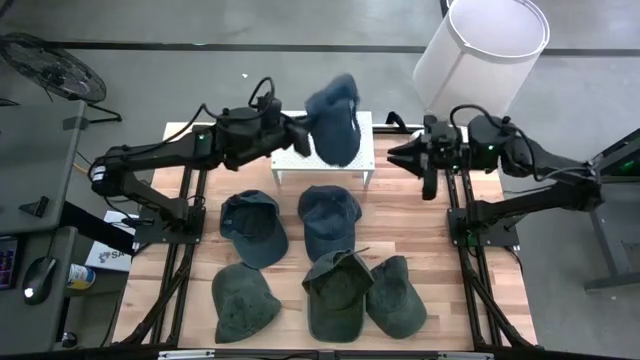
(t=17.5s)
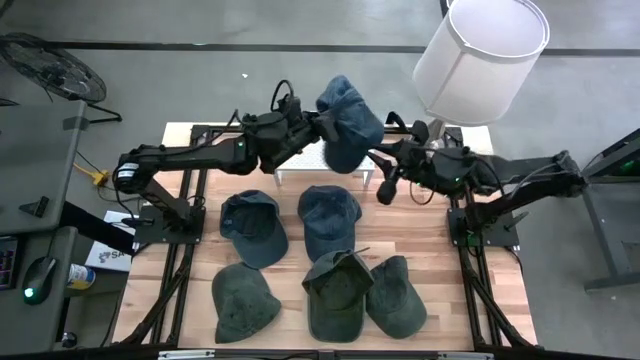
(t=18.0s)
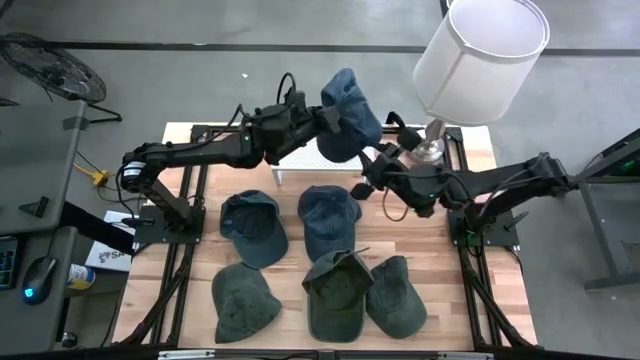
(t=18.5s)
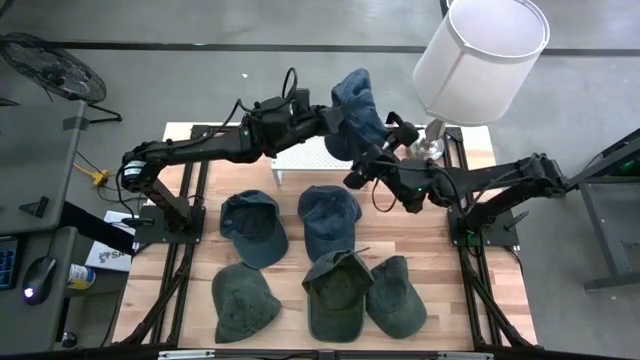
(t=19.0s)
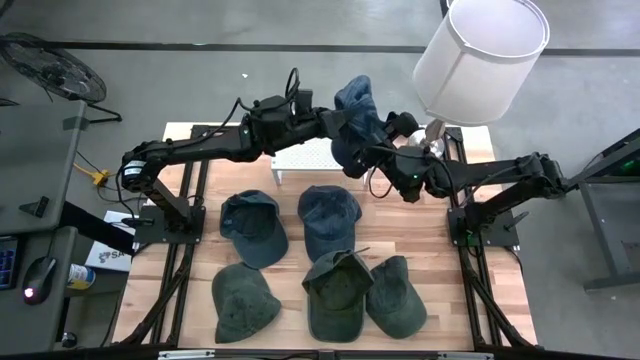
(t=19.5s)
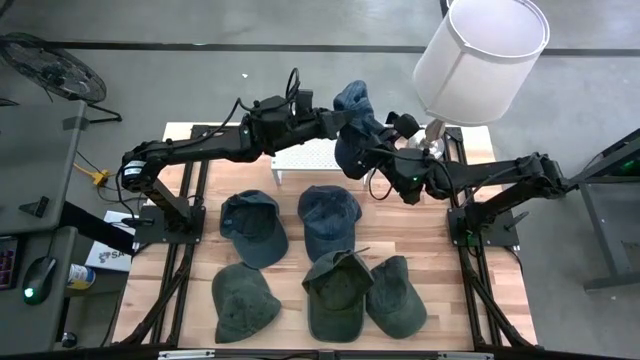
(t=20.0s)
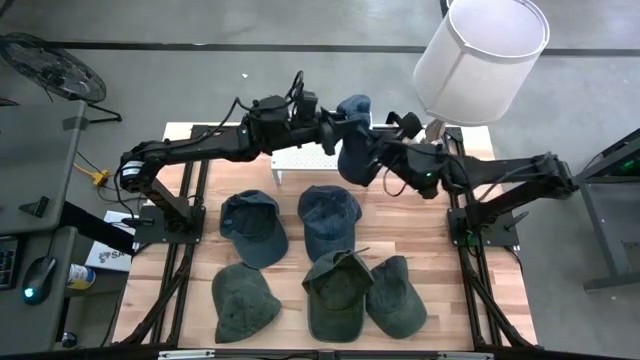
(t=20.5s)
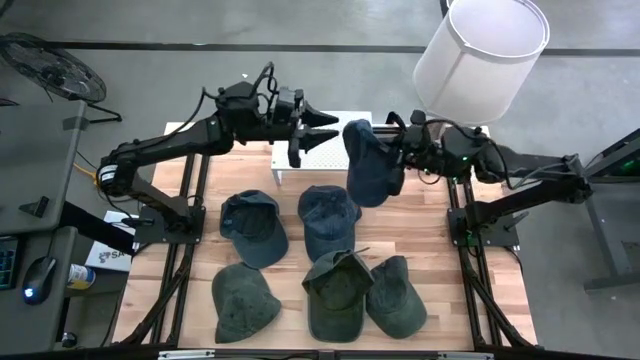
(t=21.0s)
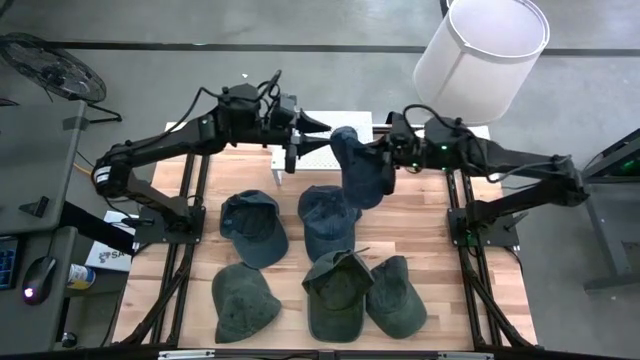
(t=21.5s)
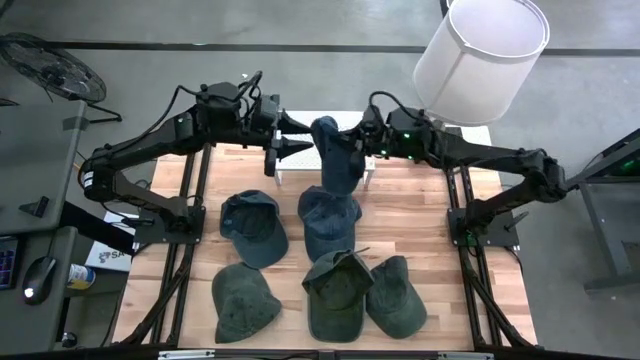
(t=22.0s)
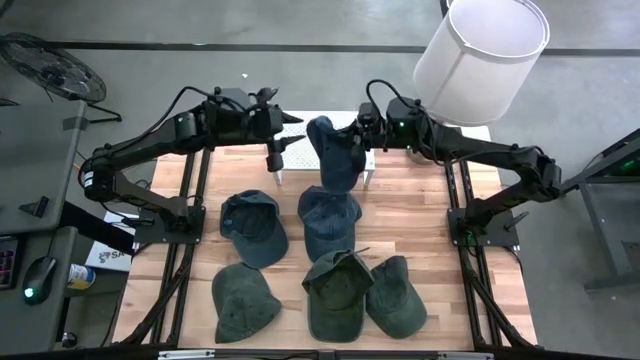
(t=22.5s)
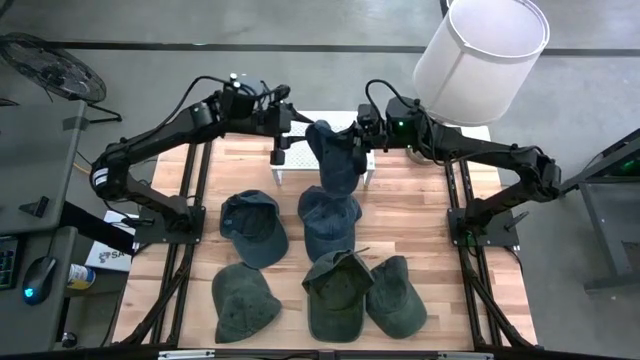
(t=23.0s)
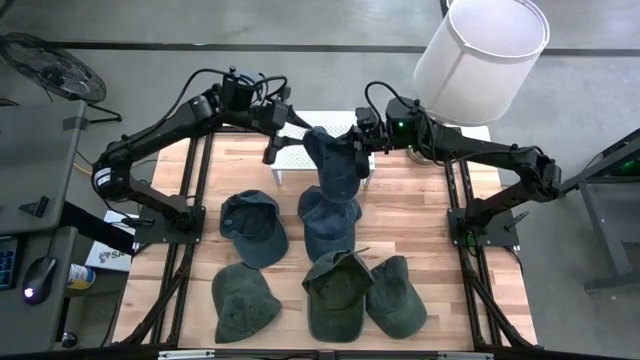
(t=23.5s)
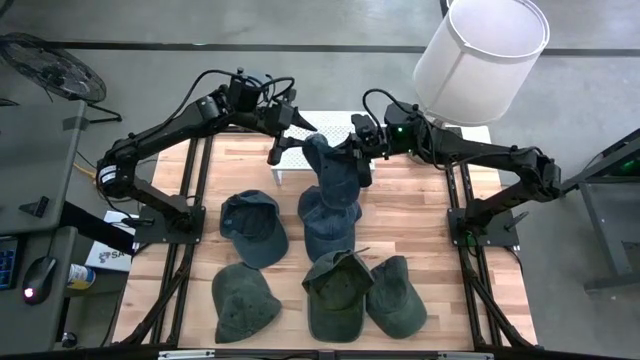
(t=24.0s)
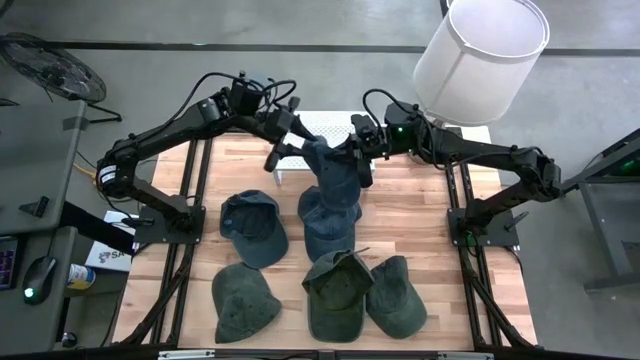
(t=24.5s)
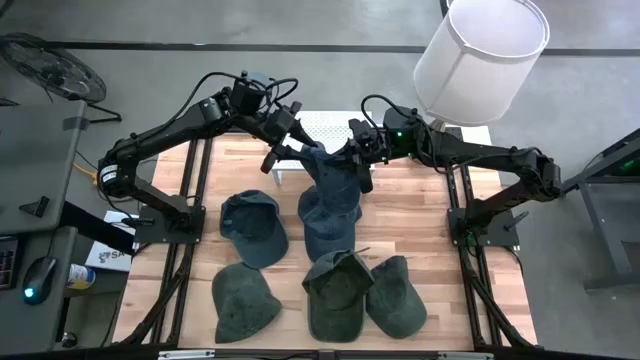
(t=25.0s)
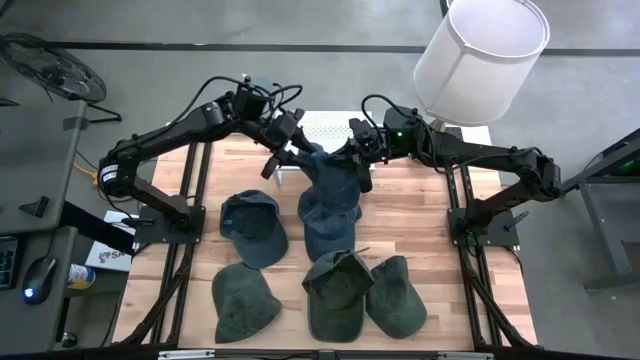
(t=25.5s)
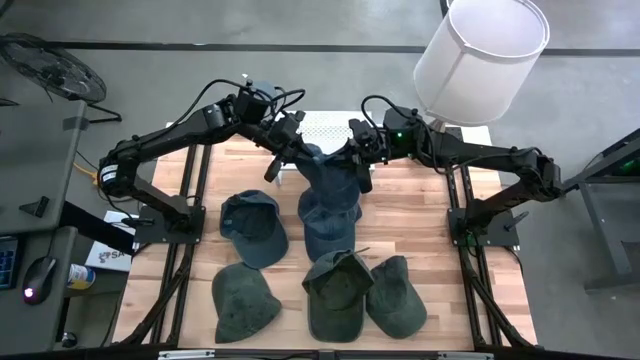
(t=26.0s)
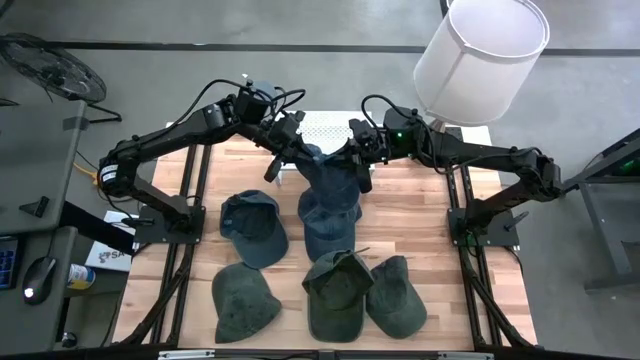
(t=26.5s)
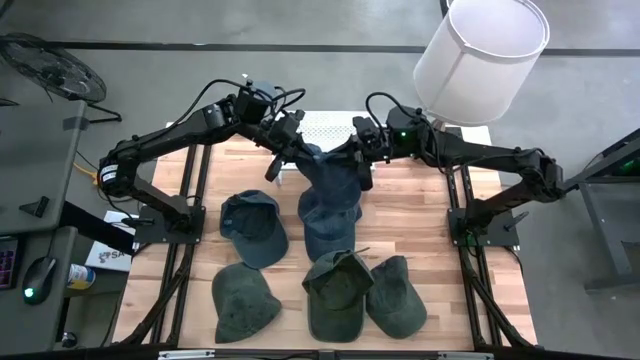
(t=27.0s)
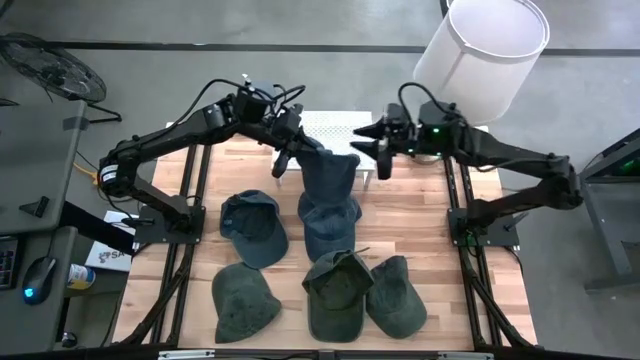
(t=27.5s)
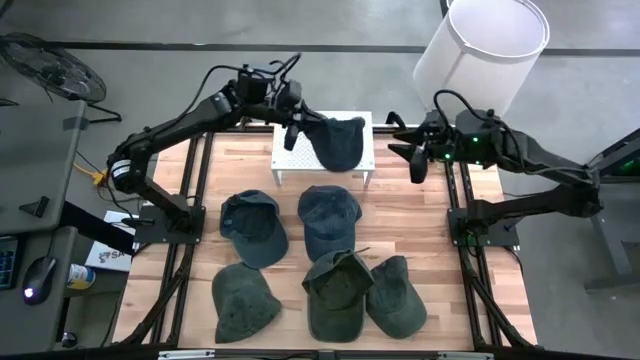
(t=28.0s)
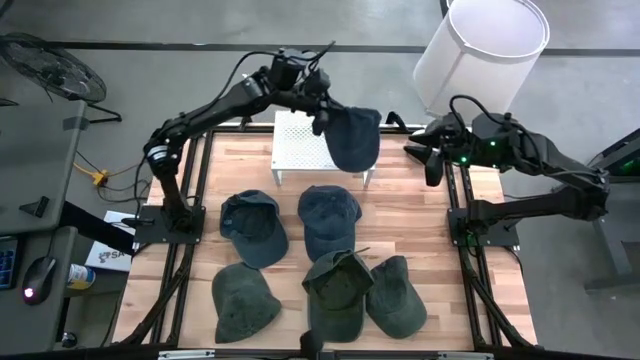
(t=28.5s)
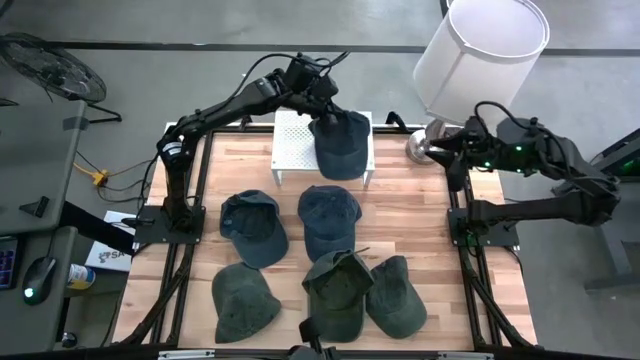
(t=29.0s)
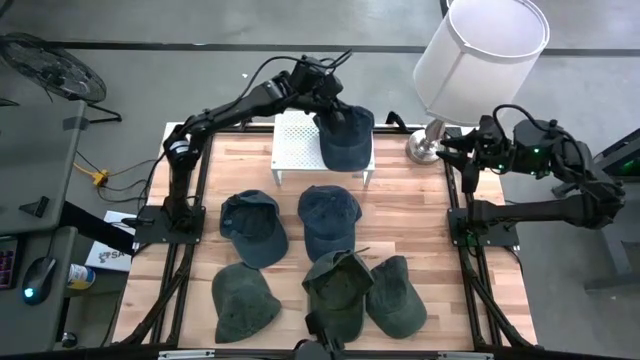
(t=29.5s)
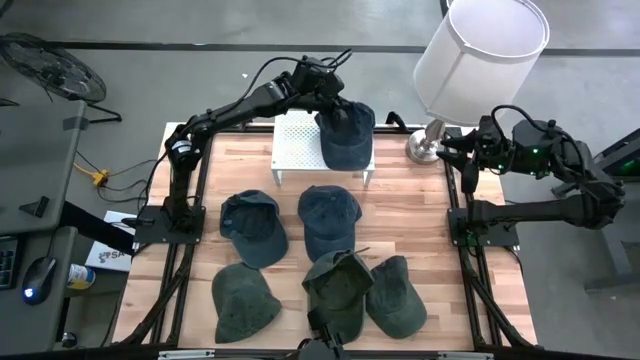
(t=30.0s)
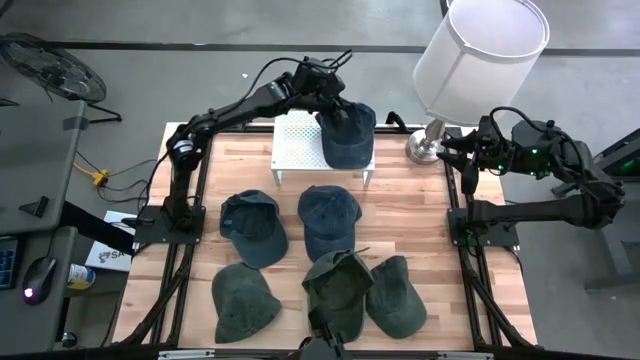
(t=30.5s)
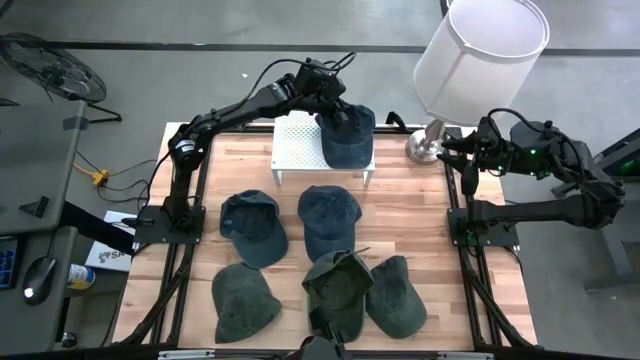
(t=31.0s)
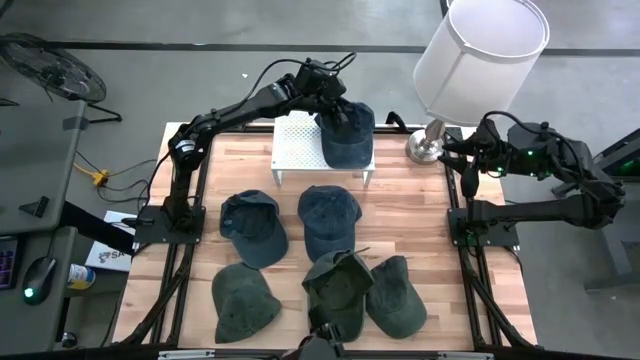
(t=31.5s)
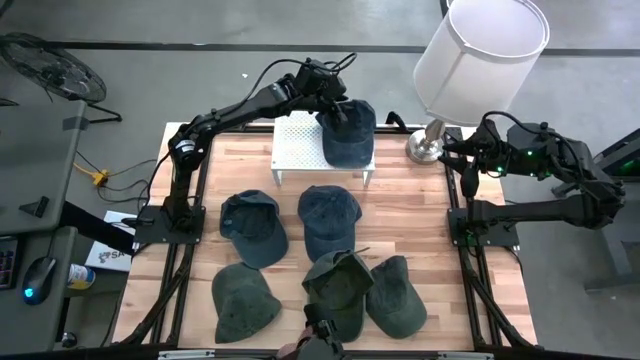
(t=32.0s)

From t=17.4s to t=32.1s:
Task: Pick & Place hat
Put the right blue cap on the shelf

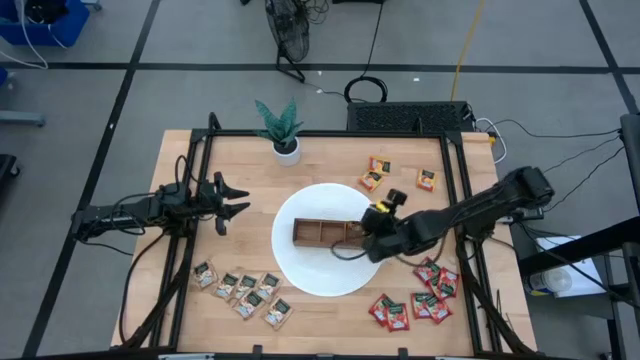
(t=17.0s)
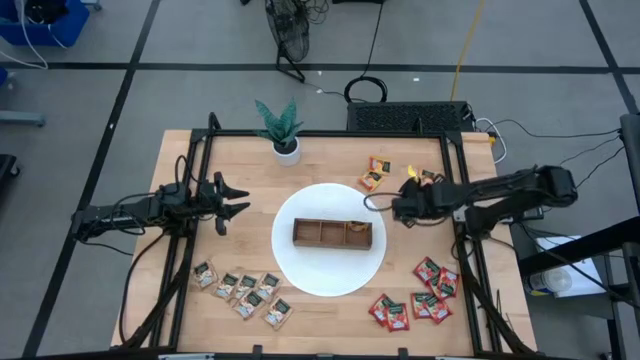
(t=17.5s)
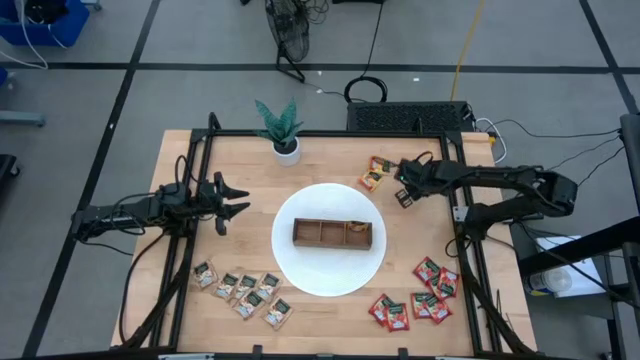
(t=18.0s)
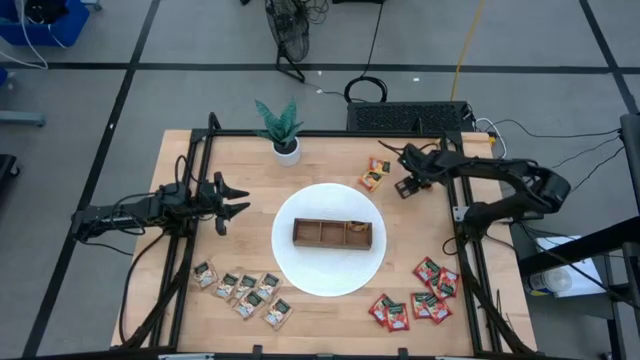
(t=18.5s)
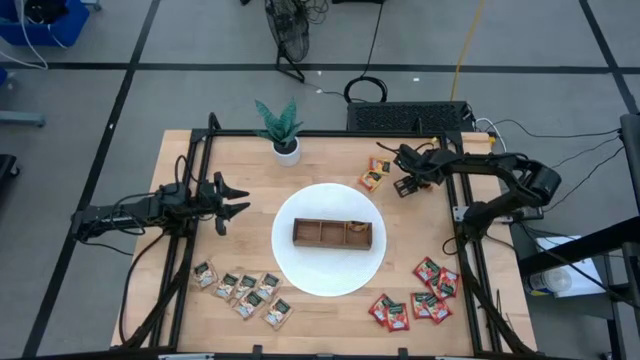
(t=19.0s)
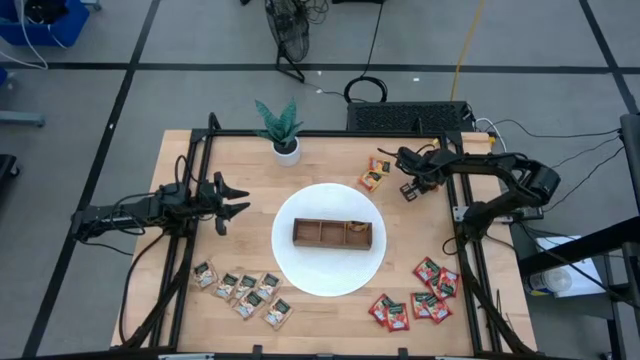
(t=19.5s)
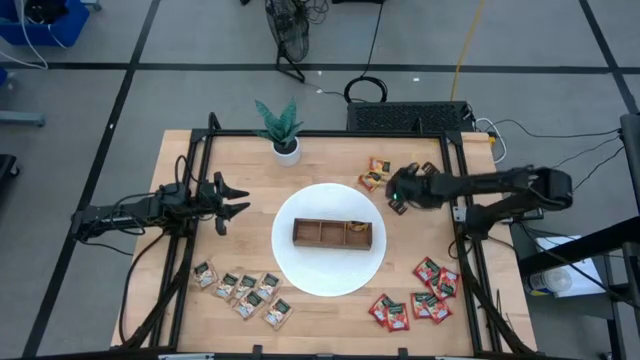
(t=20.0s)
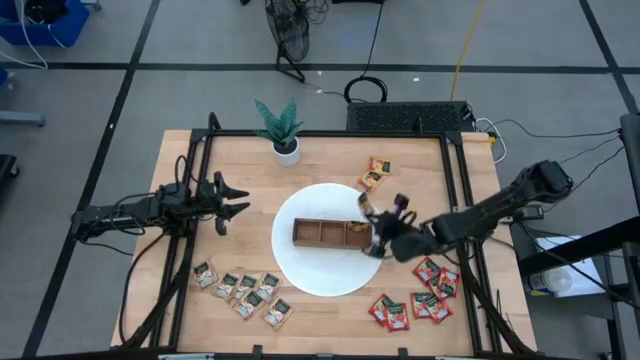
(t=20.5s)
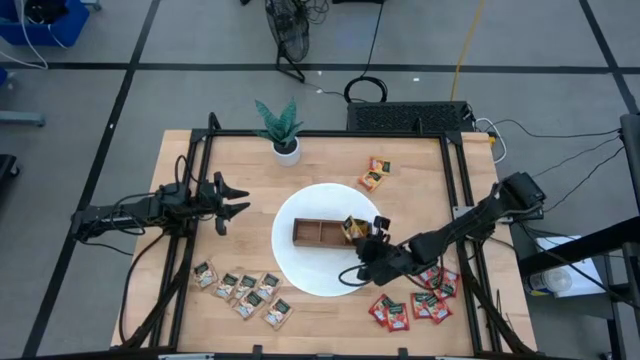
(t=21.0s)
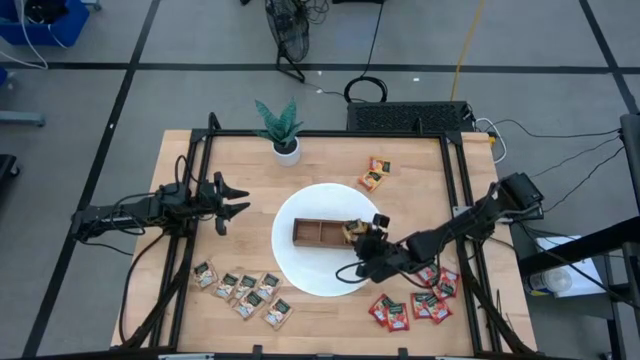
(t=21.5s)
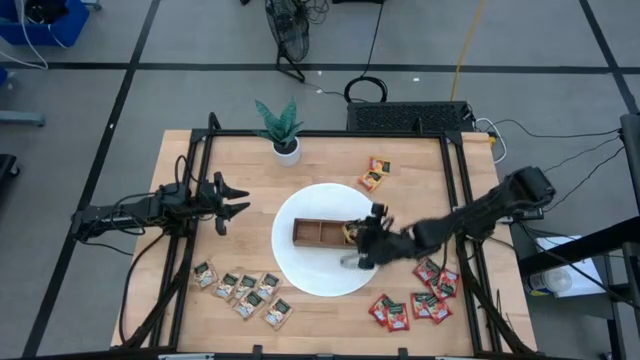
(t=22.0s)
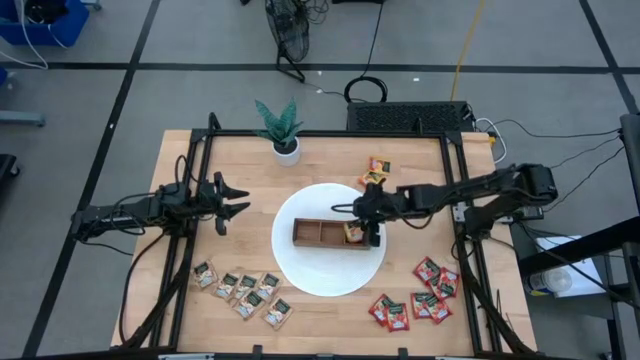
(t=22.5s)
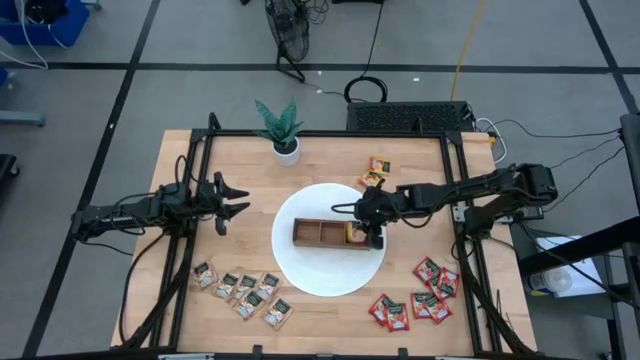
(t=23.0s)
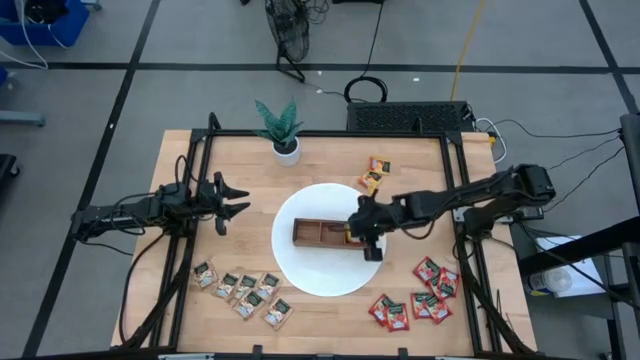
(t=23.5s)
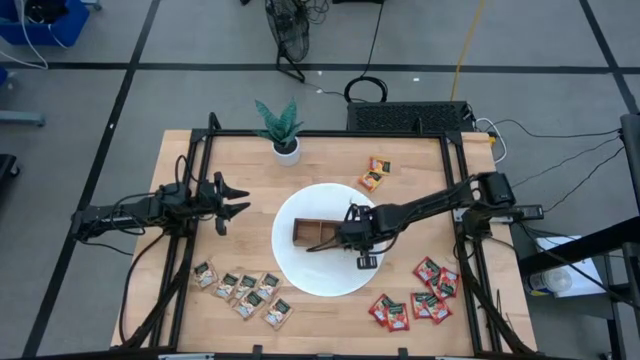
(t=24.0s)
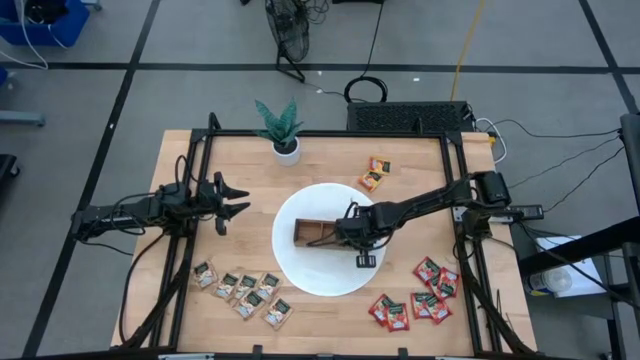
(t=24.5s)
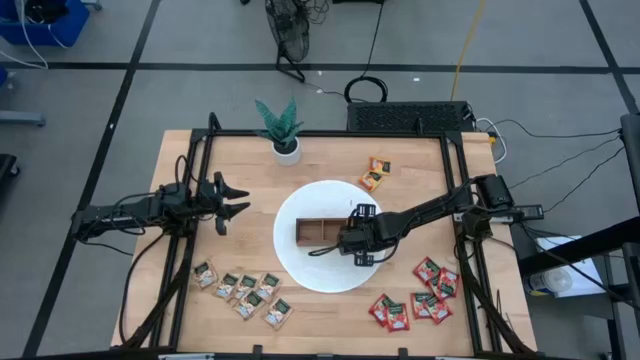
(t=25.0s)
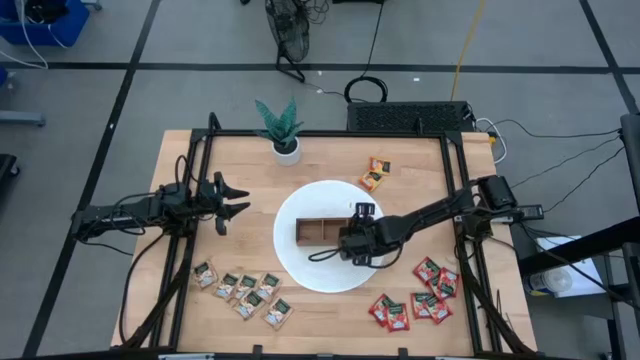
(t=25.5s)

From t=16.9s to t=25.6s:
Task: Pick & Place Tea
Put the yellow tea bag into the right section of the wooden organizer
